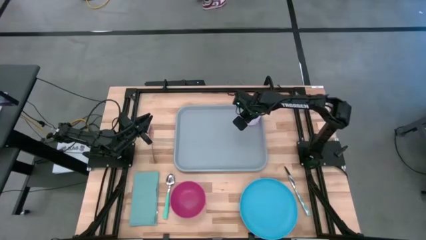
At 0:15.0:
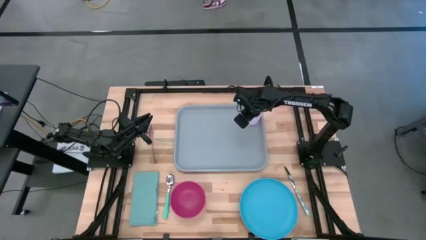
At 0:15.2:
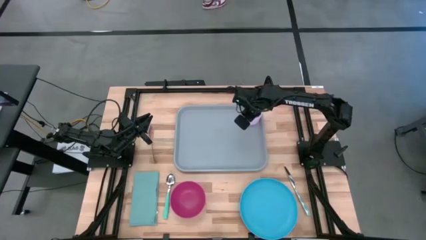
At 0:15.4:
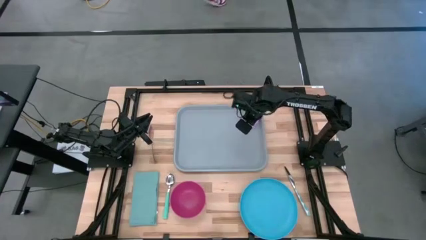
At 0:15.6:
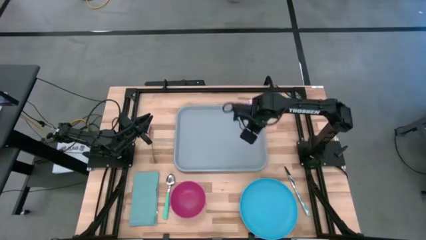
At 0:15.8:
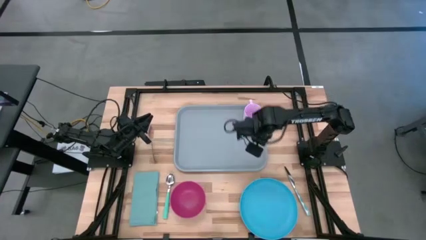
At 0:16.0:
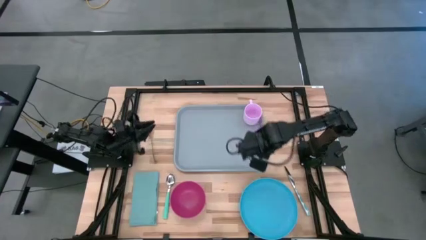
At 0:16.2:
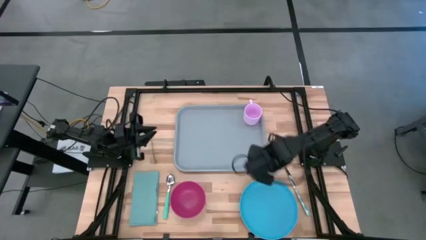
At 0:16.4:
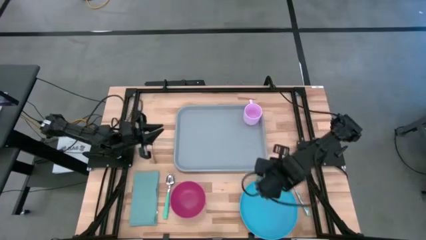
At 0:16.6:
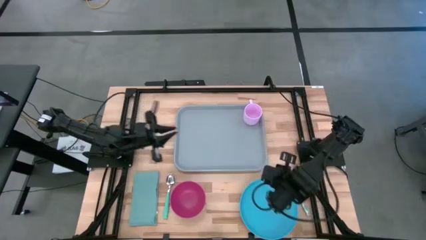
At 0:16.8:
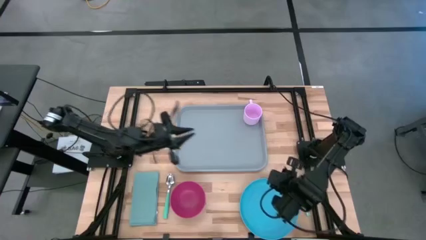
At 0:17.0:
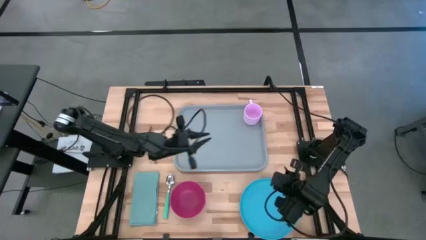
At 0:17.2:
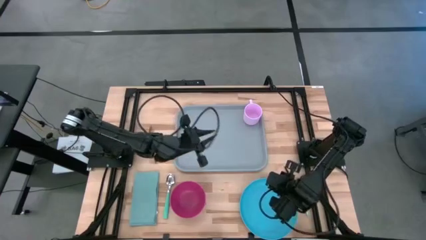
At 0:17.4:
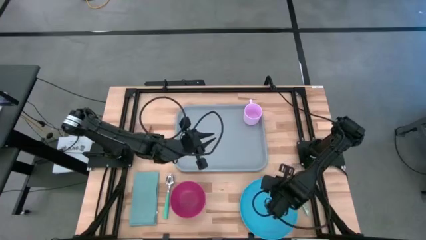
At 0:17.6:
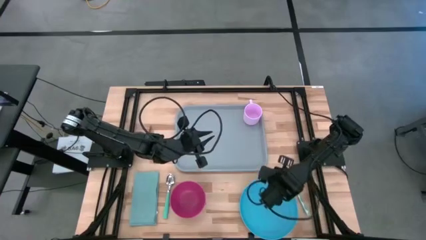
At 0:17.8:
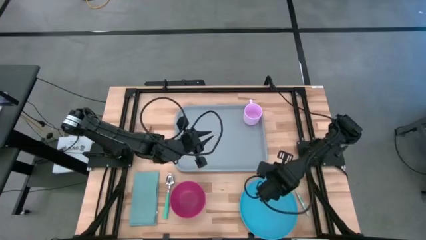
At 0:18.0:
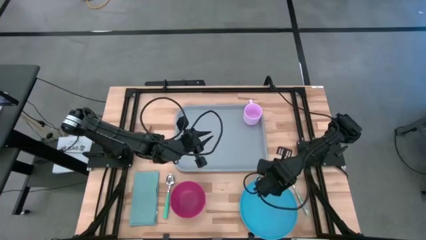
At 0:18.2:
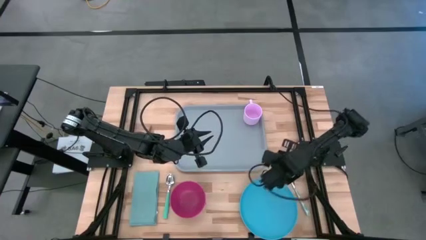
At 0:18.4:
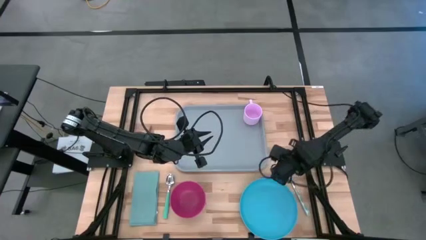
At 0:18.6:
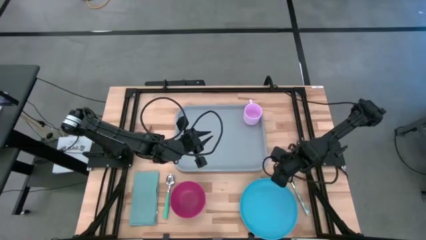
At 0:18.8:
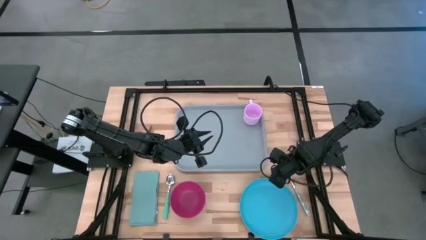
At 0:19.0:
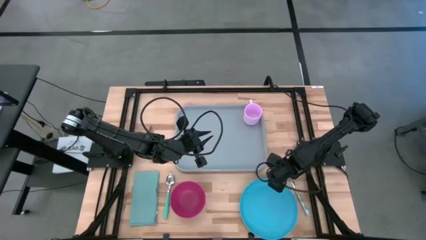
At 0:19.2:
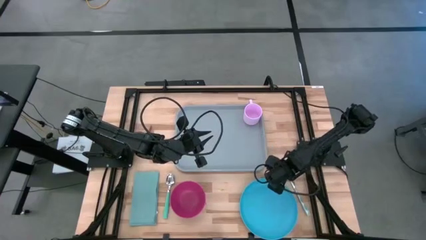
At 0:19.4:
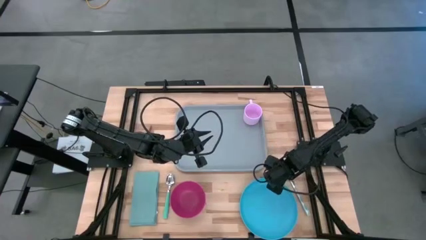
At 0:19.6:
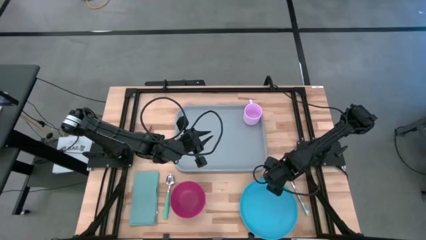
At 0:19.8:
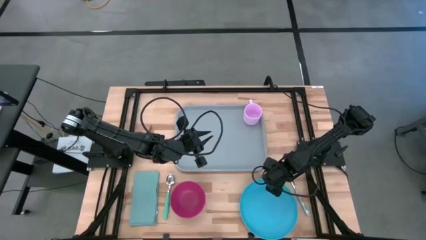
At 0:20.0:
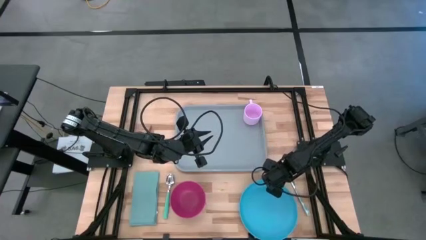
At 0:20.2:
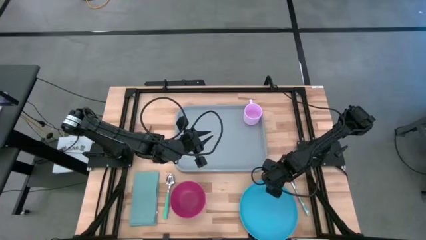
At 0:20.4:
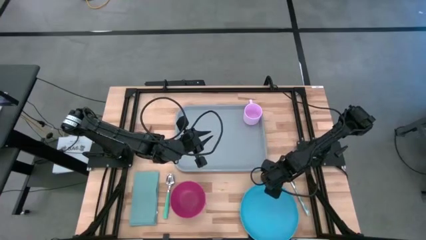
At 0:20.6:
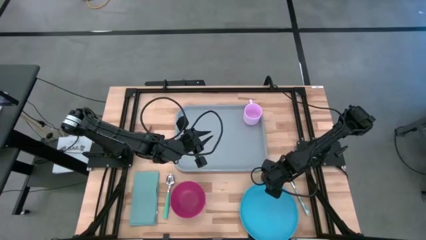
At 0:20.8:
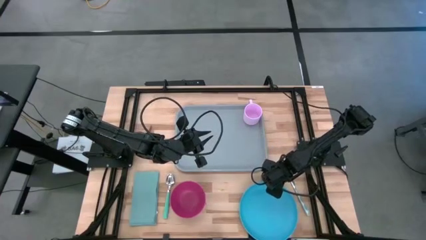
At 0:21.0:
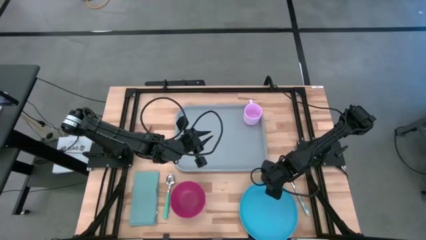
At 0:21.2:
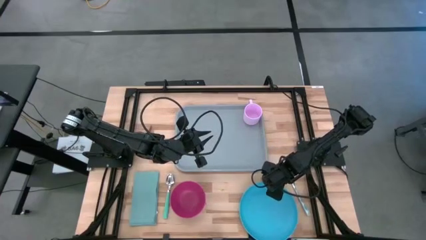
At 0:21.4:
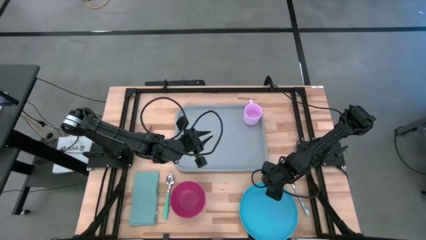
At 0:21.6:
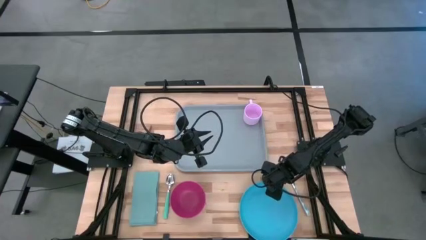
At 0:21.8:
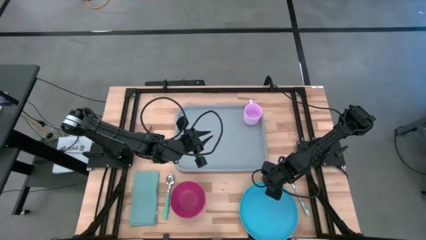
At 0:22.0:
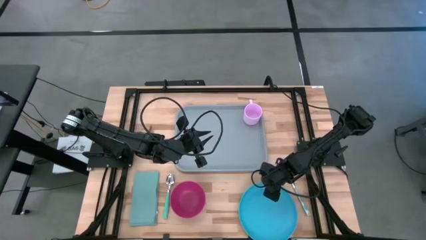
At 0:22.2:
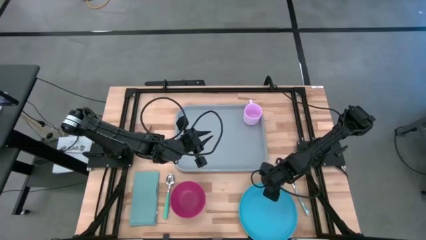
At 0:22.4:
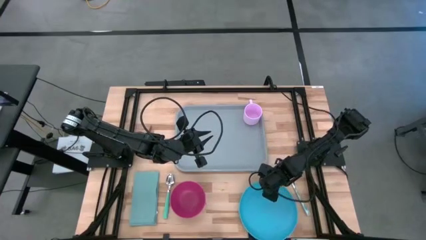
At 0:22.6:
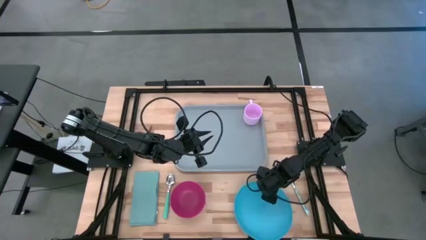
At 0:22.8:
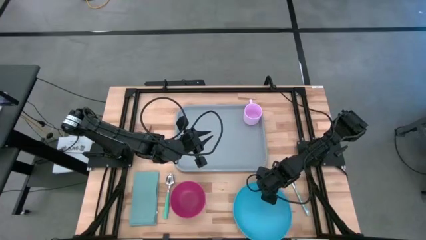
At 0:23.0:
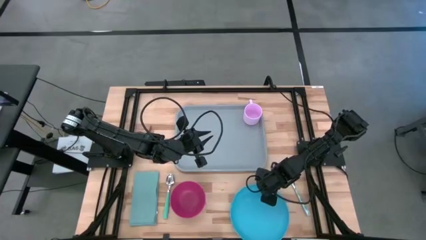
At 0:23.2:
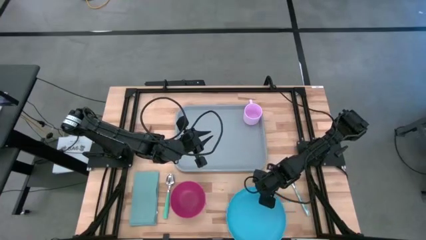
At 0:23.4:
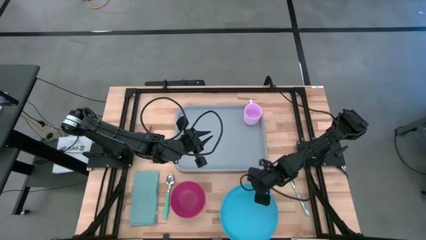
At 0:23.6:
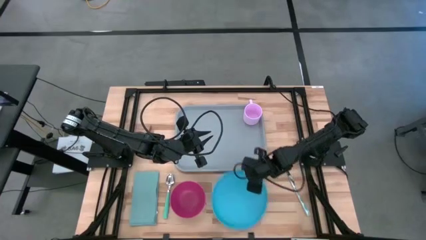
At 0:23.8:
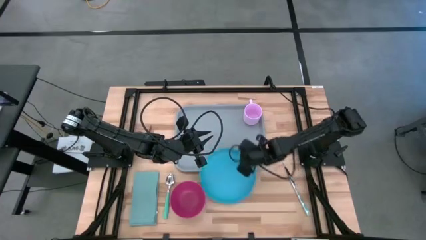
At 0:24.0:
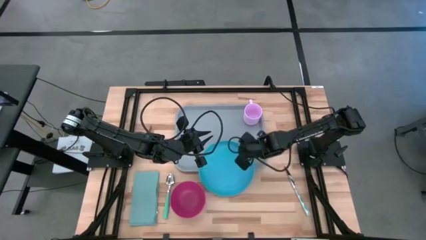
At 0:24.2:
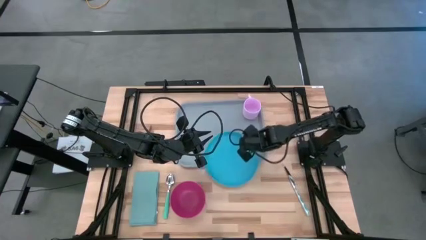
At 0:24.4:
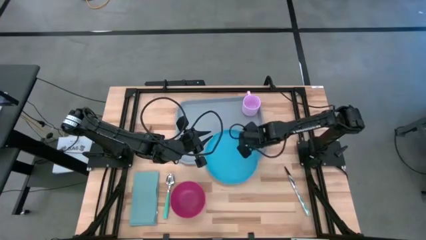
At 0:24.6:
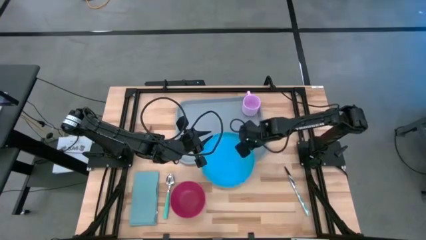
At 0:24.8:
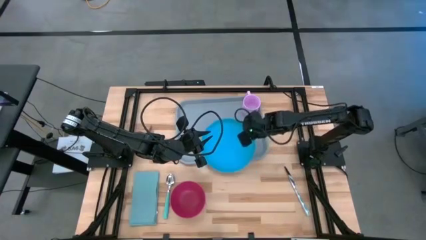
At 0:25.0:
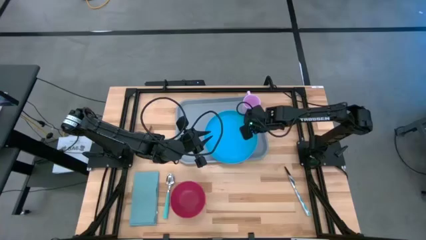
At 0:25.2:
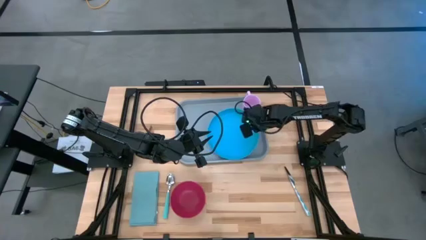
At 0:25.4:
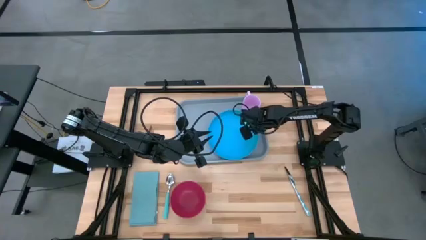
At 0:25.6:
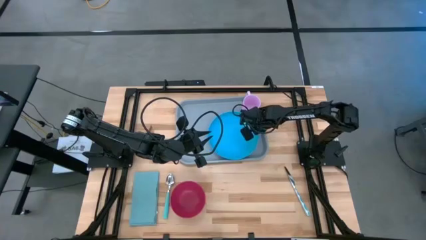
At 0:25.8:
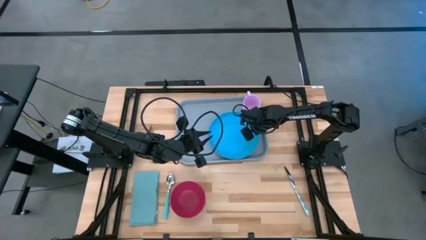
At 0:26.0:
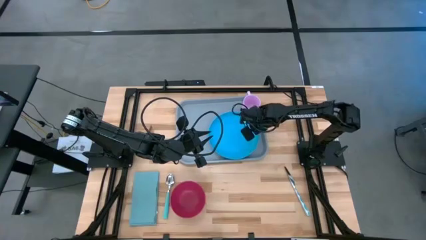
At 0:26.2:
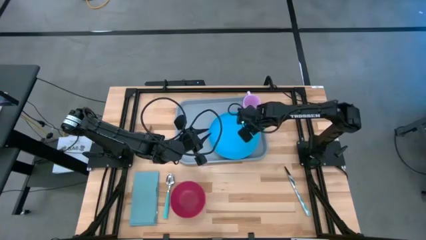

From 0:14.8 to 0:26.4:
Task: Set up tray
Put the blue plate on the gray tray

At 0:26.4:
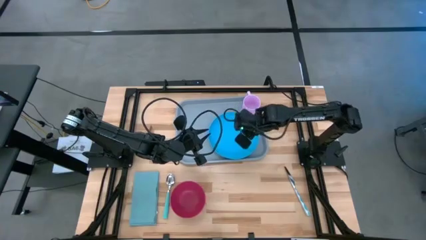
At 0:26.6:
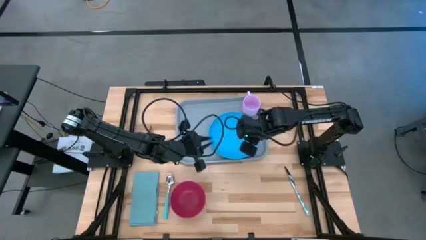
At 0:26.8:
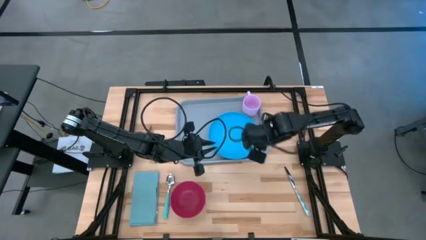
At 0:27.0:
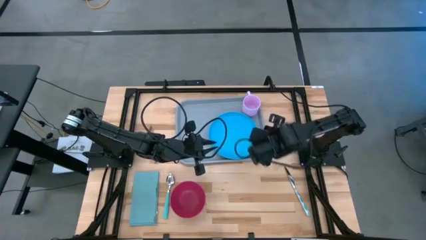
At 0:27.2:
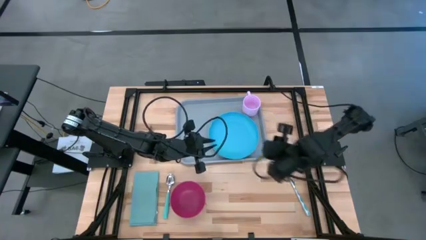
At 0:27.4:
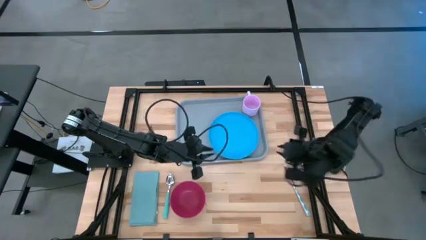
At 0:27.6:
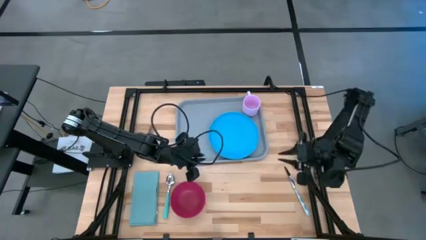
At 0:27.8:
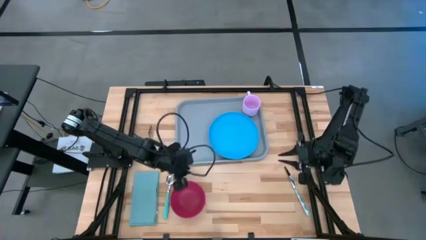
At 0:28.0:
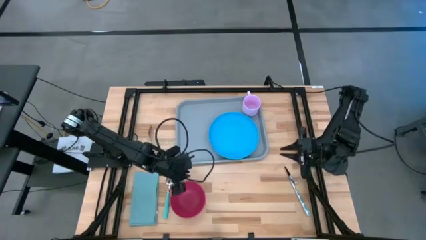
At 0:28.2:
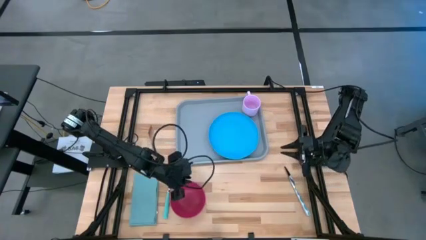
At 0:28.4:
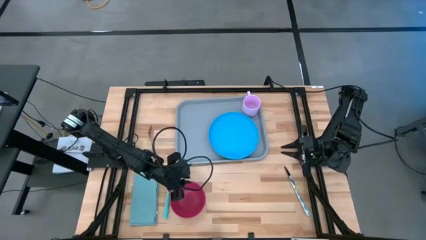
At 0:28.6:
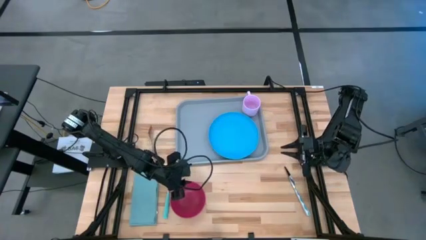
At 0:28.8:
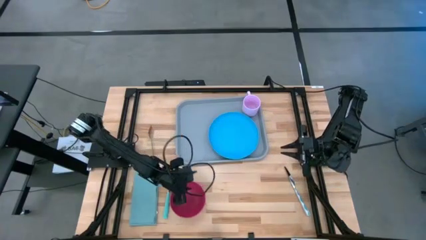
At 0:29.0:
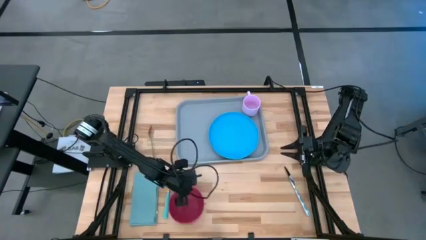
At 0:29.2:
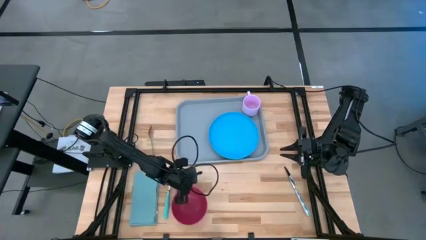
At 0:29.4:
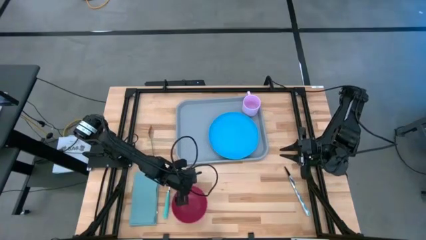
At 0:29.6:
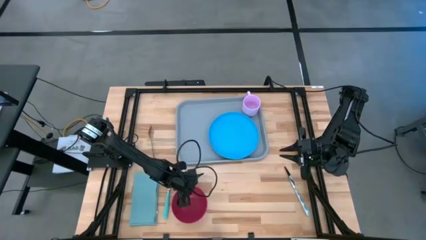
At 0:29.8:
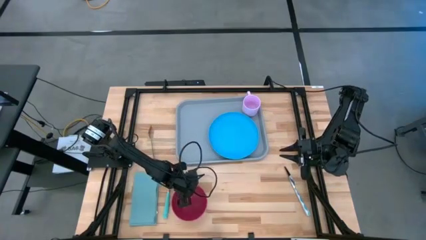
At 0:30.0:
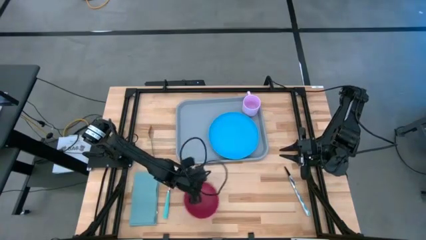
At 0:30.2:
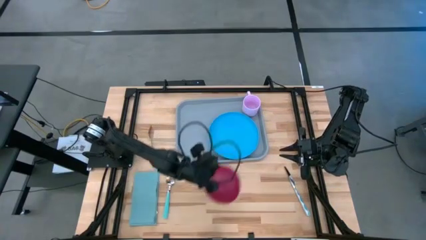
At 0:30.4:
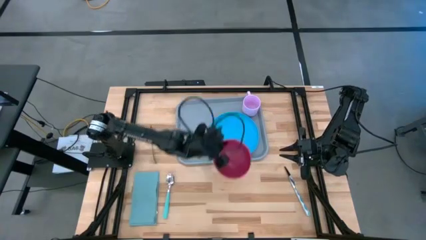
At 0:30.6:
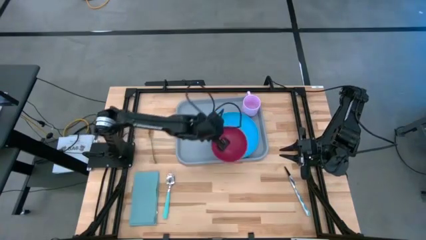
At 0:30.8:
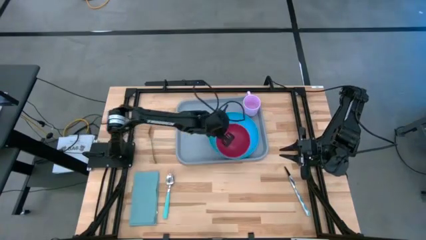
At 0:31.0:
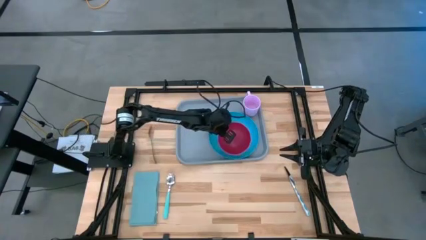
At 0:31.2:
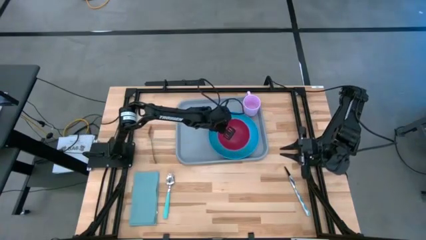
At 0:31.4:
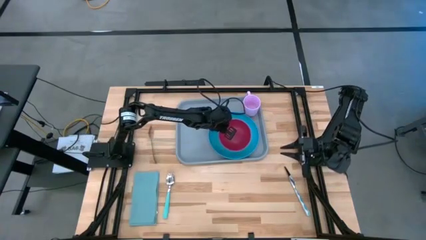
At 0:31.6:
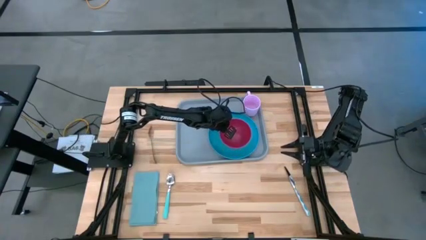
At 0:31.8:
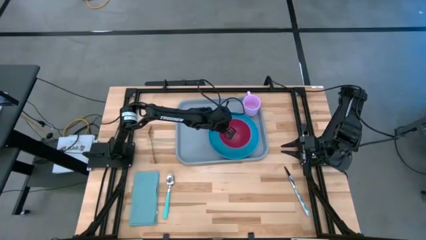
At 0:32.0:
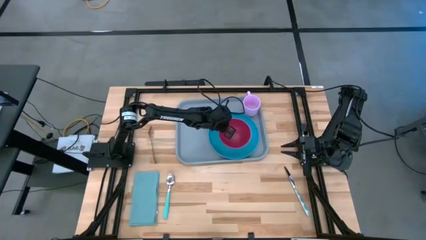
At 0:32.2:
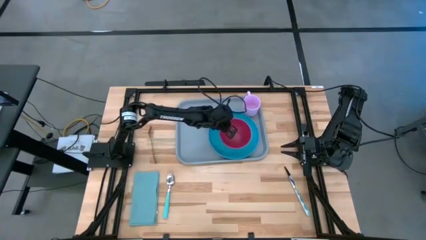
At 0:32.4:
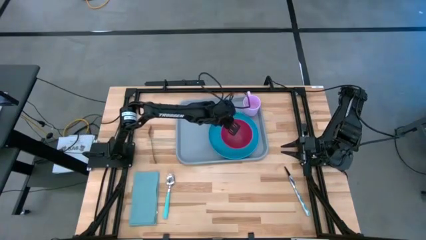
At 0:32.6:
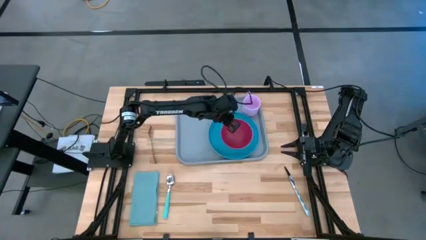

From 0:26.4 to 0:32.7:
Put the red bowl on the blue plate
